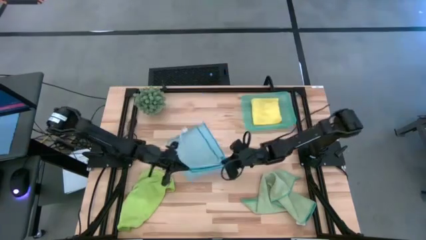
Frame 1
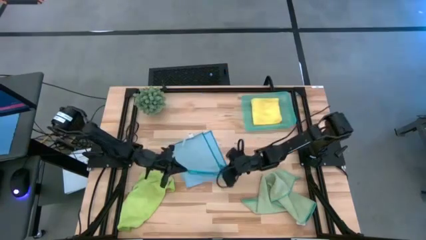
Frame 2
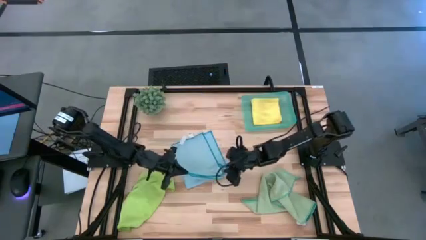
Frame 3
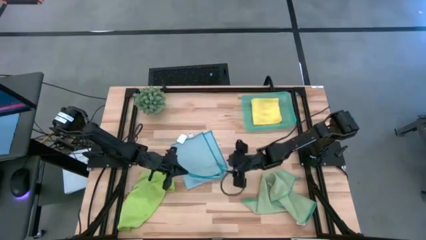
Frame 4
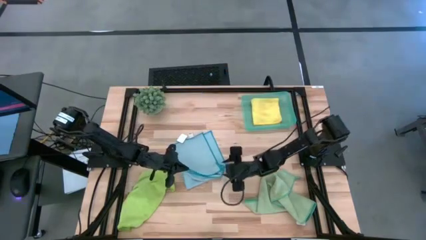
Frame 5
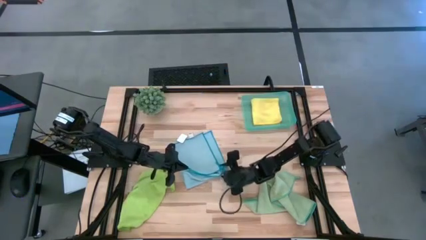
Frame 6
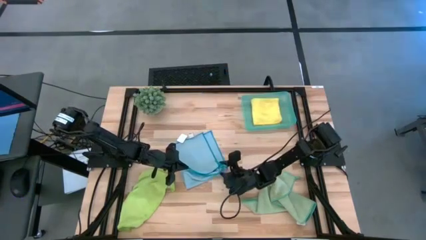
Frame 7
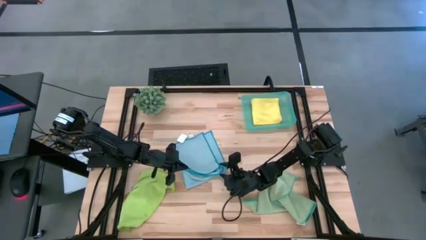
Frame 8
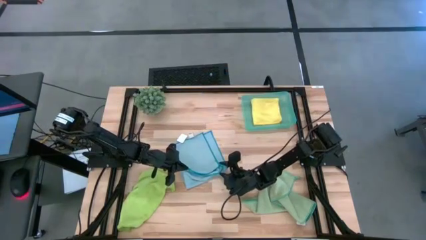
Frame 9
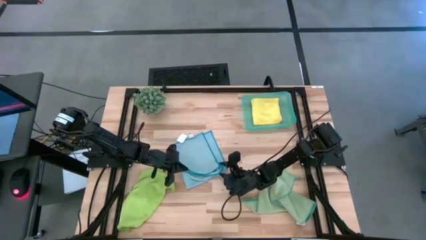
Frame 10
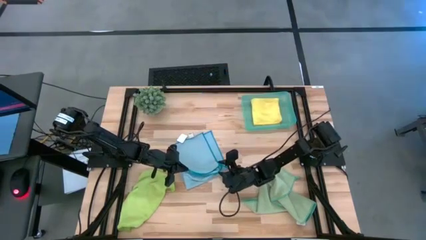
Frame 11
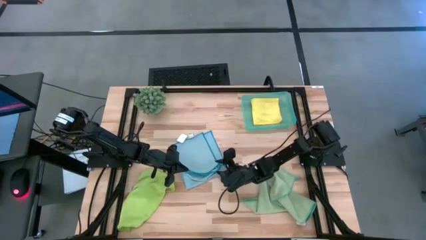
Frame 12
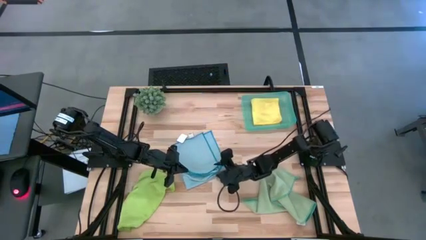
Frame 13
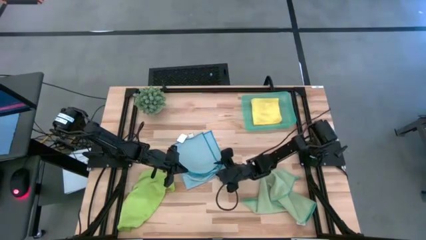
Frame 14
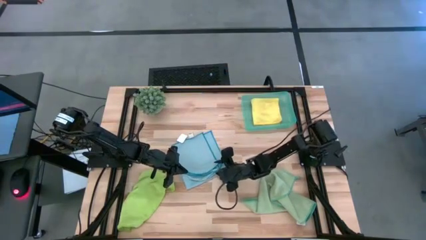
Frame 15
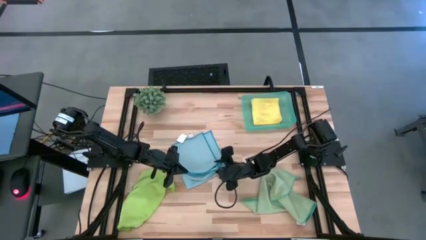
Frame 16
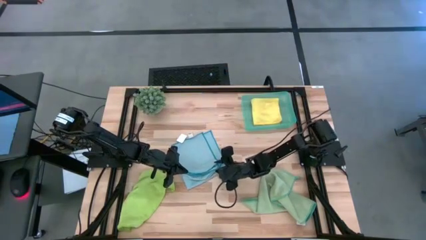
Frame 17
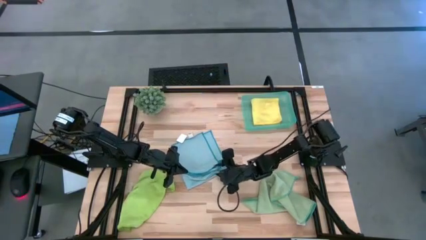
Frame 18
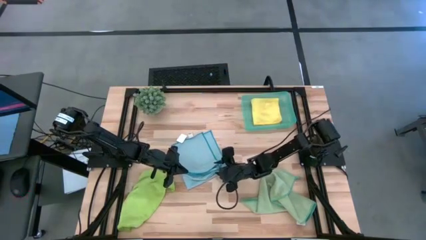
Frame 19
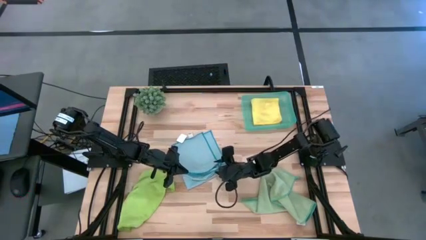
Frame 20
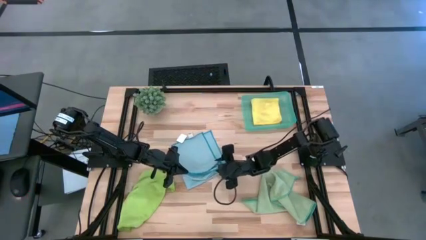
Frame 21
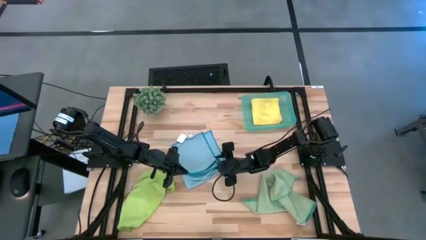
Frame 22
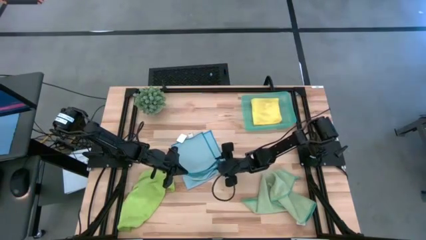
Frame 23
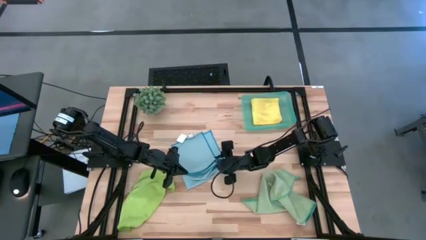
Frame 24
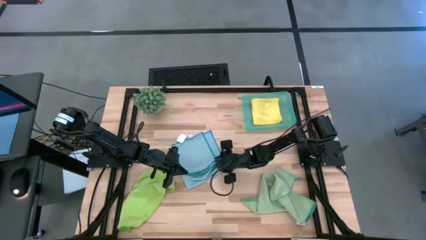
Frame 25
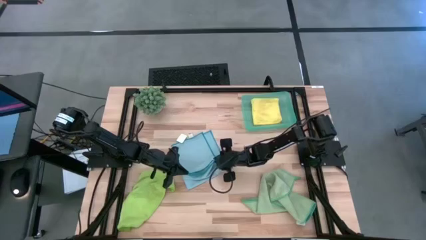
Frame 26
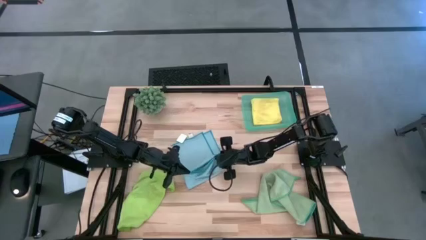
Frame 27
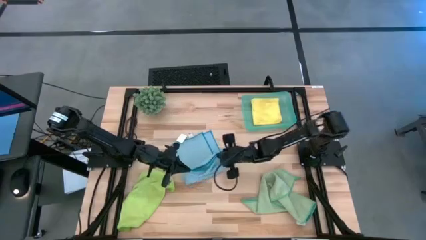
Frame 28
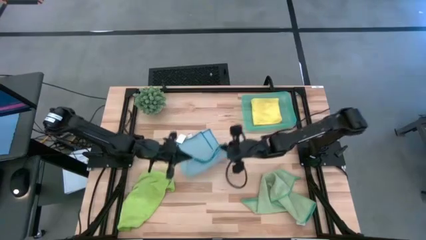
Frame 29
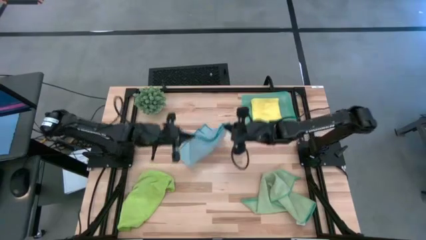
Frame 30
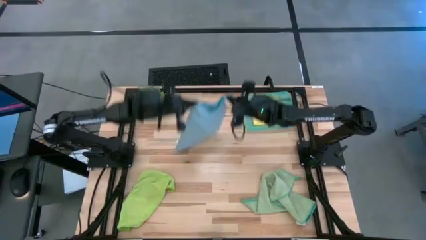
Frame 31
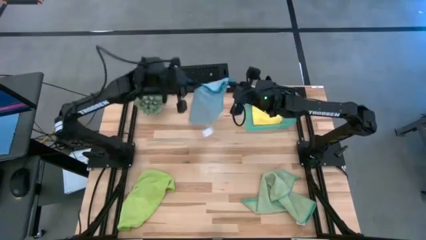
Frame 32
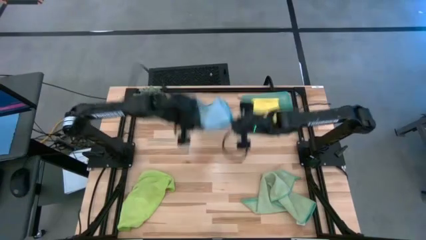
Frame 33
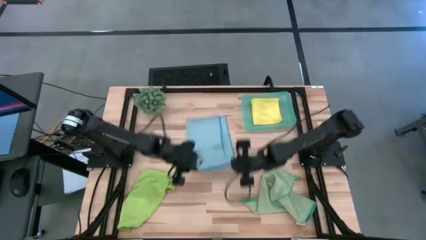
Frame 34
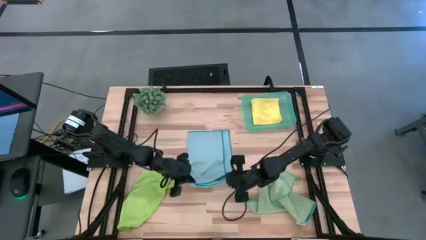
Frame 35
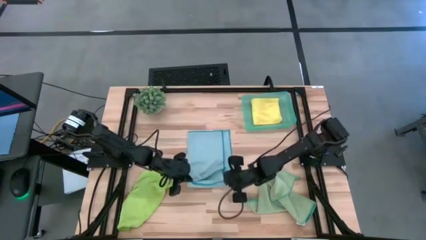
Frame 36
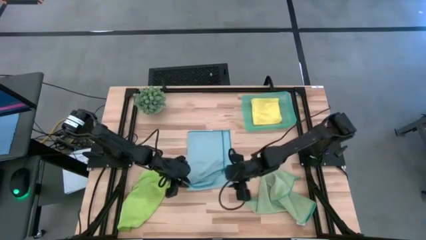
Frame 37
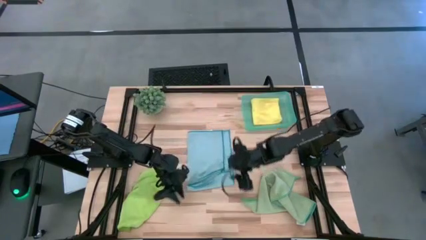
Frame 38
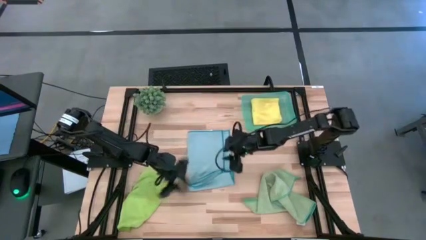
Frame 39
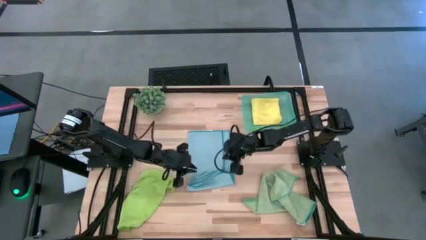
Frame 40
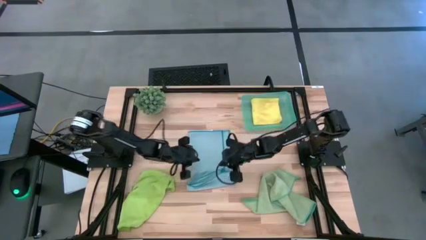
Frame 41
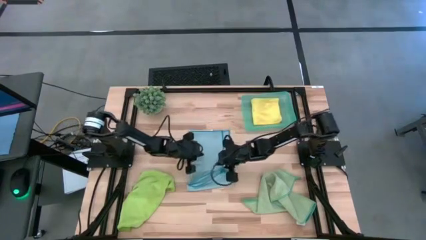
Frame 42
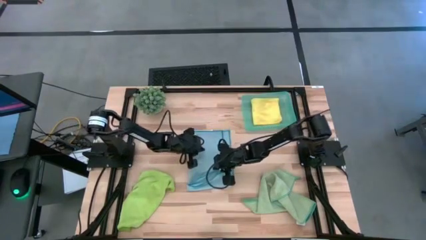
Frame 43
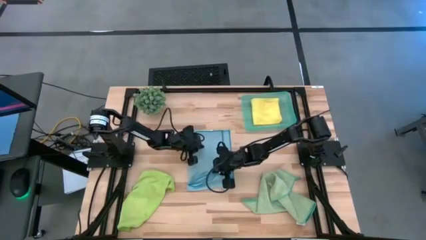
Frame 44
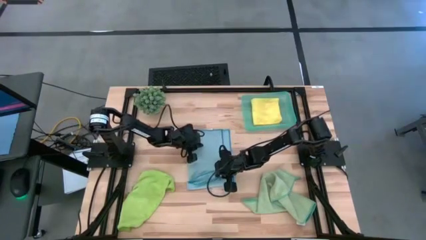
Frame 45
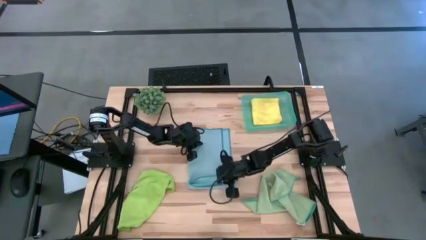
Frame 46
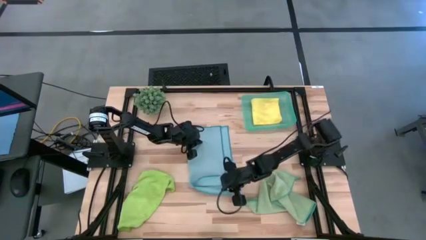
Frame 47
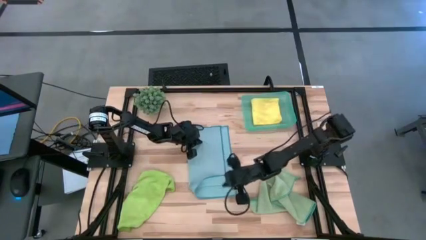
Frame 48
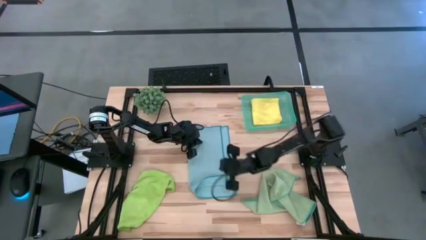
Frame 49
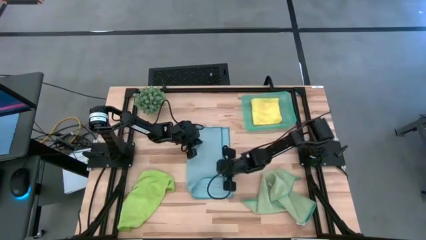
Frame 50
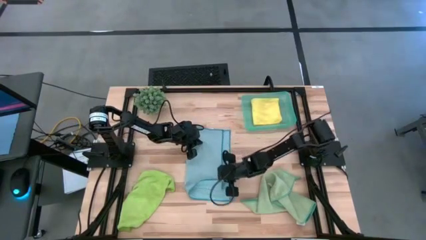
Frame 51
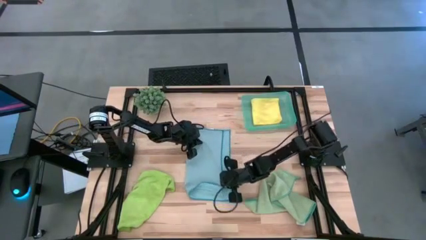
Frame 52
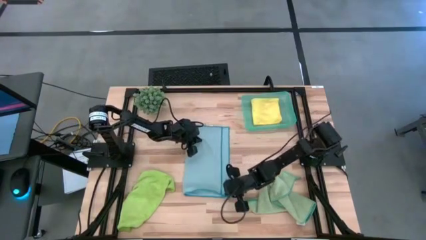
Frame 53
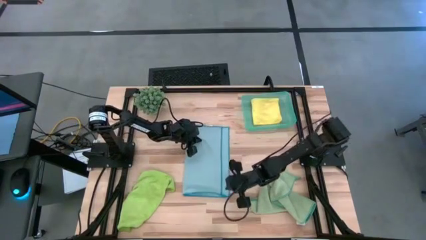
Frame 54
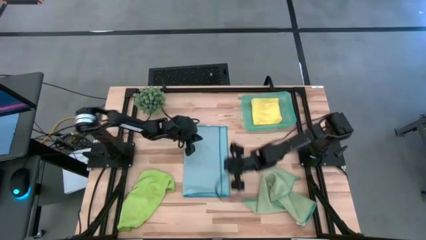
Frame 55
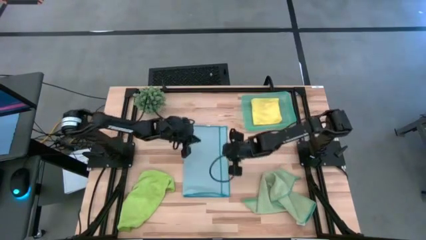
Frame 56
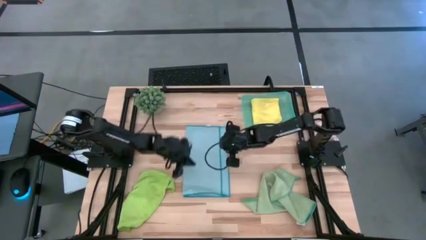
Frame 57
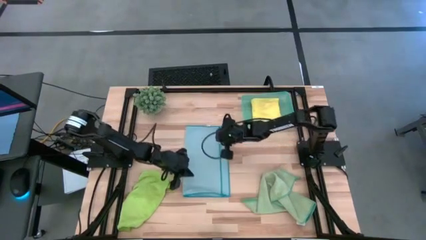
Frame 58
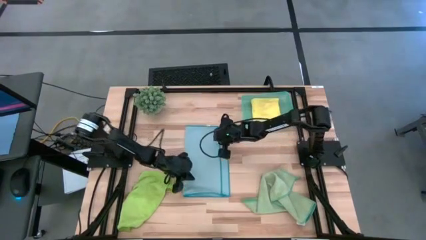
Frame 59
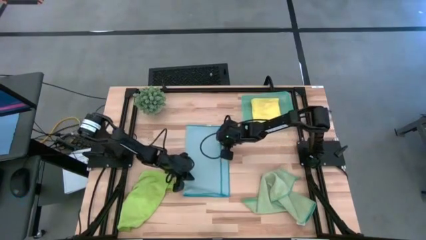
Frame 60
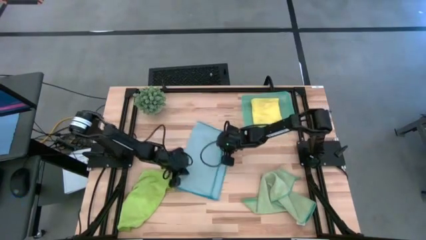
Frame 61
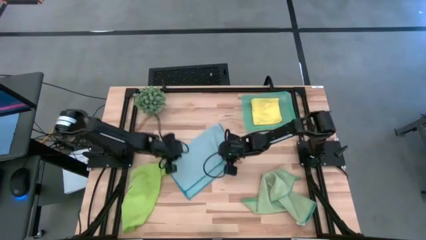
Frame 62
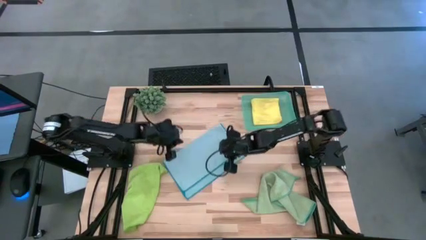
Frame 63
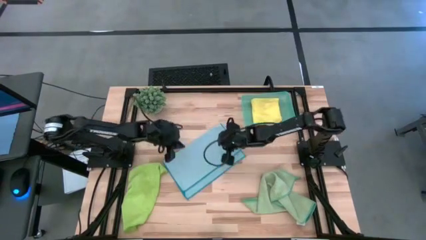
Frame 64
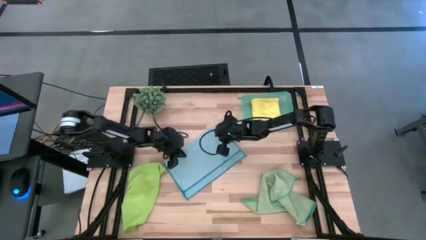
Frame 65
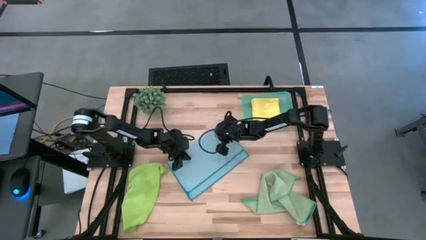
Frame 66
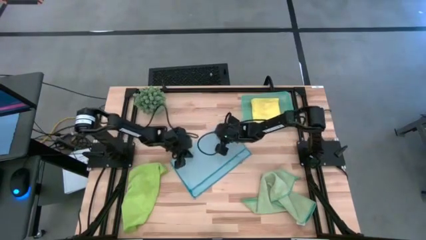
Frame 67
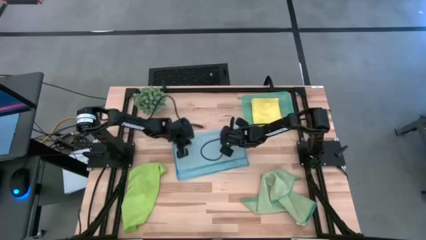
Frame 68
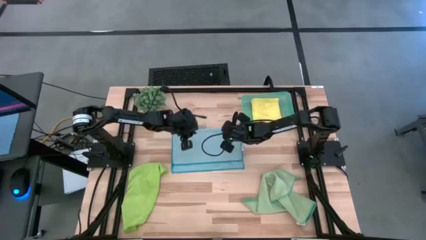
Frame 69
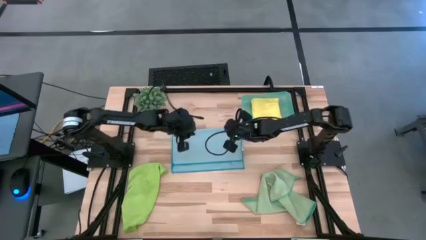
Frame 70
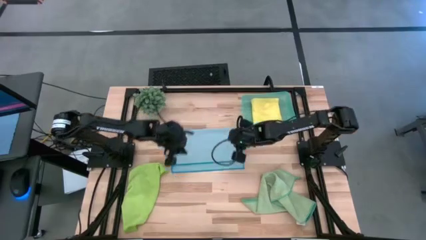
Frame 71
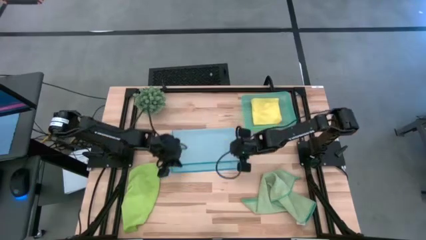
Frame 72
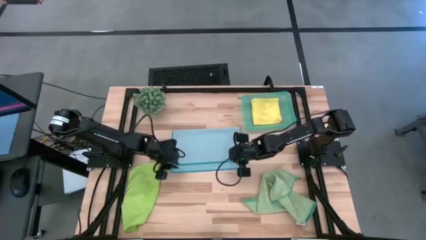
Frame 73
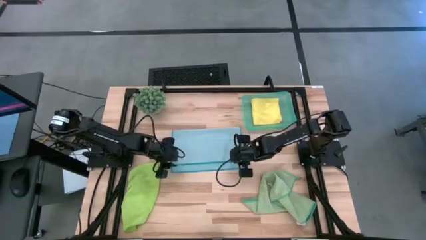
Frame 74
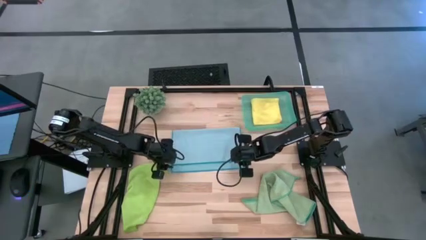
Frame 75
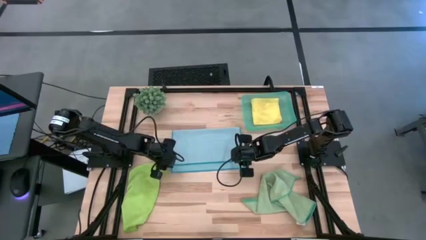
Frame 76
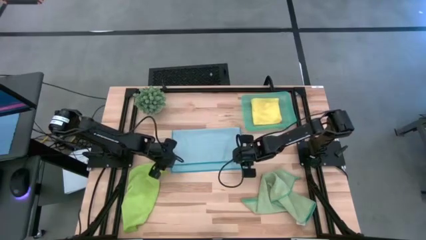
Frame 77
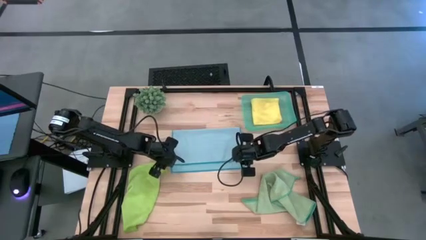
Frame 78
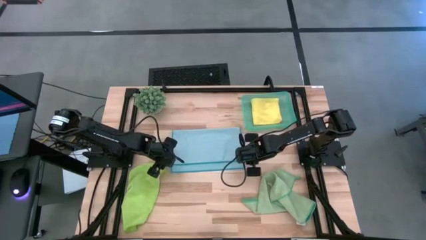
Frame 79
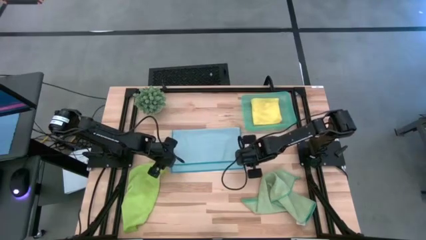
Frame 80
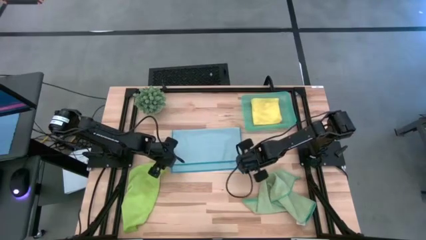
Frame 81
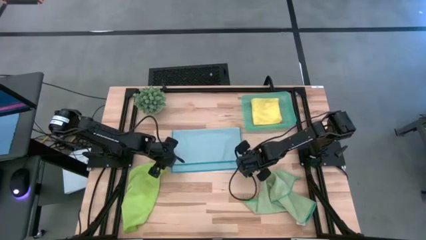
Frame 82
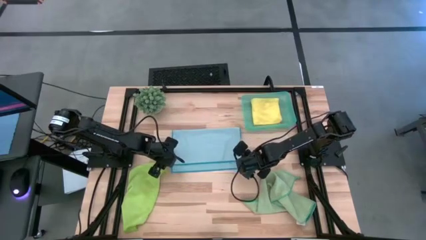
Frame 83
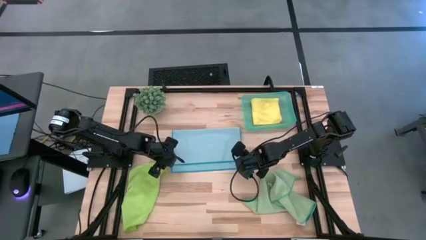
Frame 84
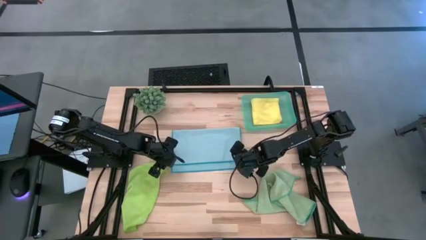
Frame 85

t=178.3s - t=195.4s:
Task: Fold microfiber towels
Fold the blue microfiber cloth
